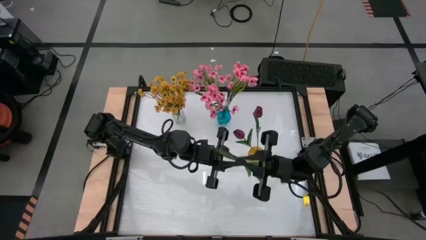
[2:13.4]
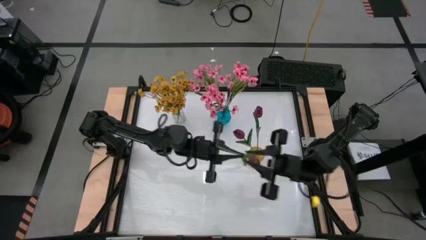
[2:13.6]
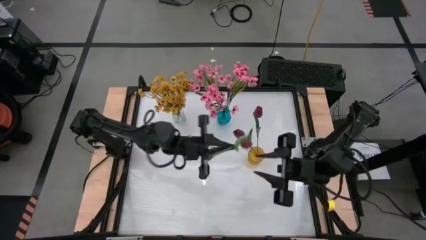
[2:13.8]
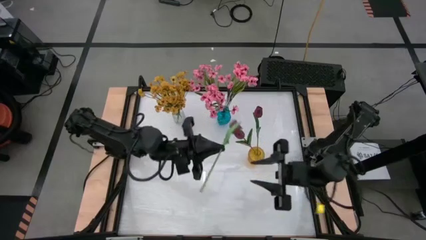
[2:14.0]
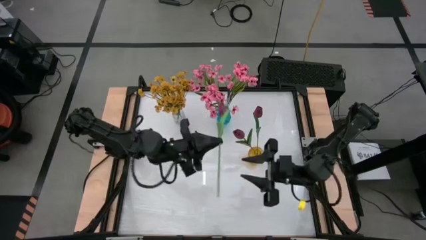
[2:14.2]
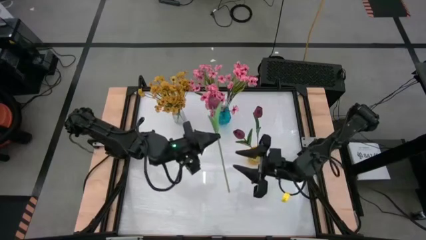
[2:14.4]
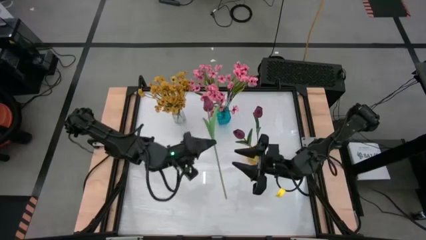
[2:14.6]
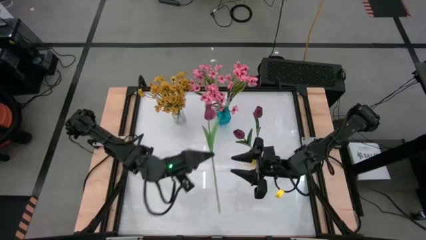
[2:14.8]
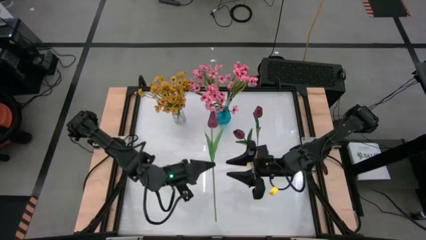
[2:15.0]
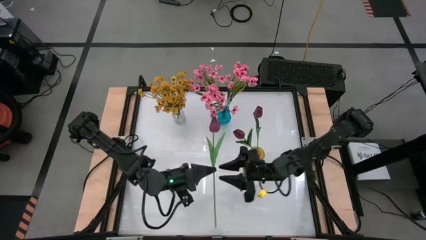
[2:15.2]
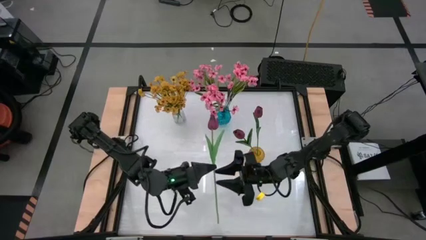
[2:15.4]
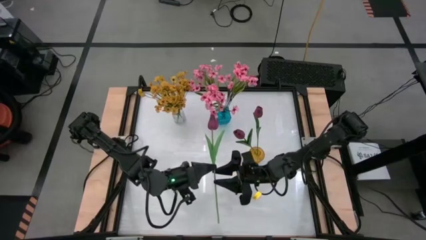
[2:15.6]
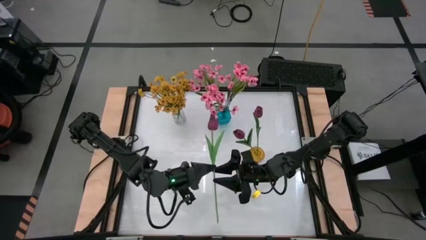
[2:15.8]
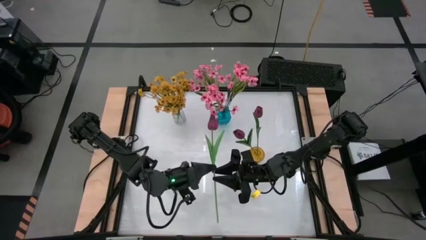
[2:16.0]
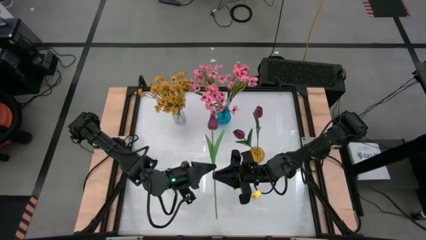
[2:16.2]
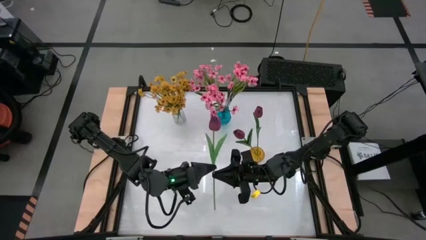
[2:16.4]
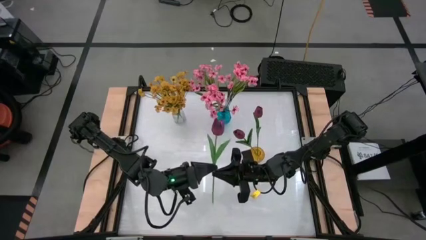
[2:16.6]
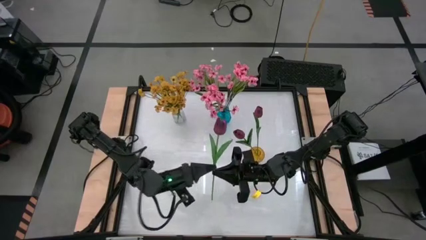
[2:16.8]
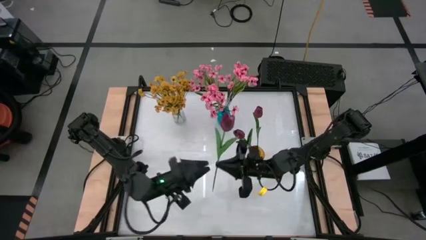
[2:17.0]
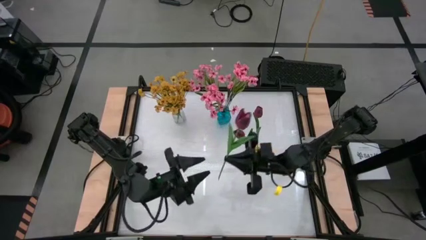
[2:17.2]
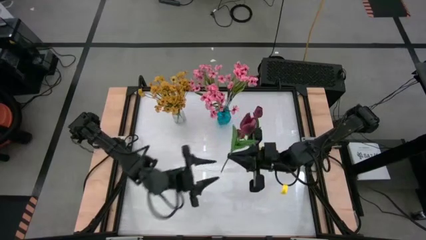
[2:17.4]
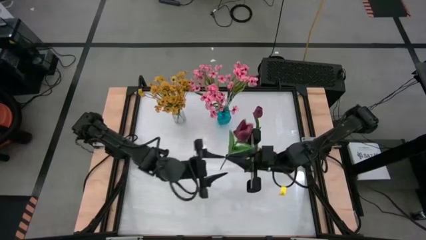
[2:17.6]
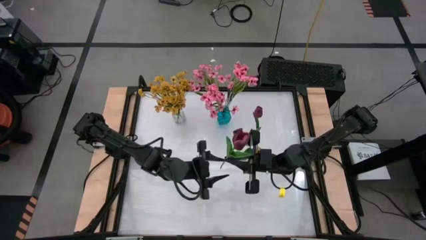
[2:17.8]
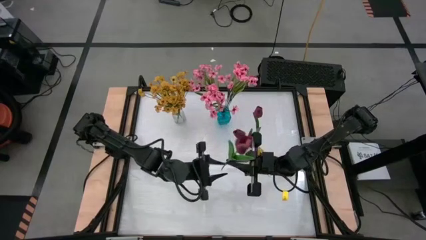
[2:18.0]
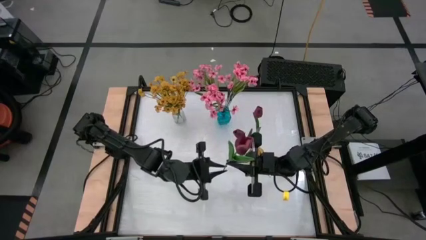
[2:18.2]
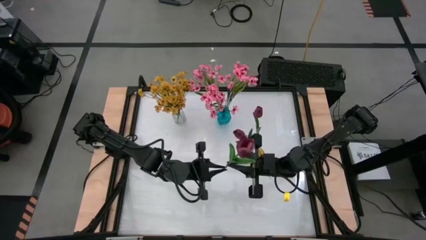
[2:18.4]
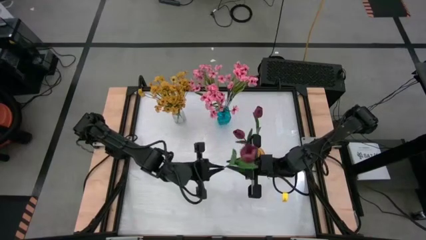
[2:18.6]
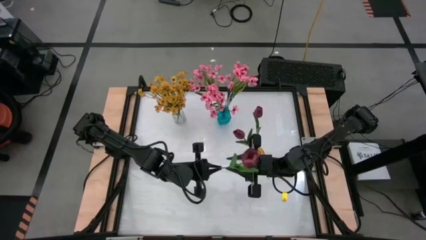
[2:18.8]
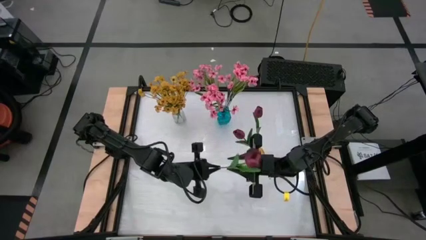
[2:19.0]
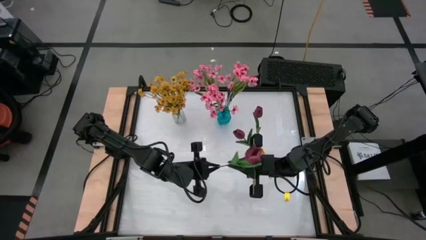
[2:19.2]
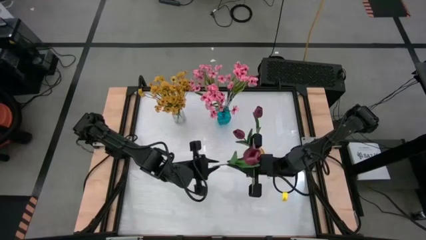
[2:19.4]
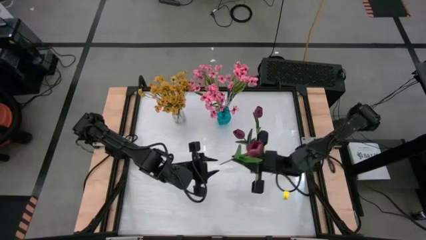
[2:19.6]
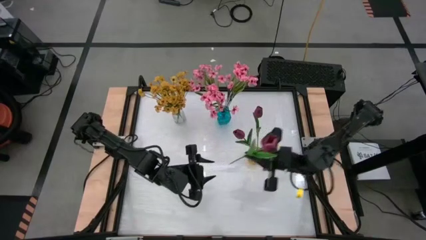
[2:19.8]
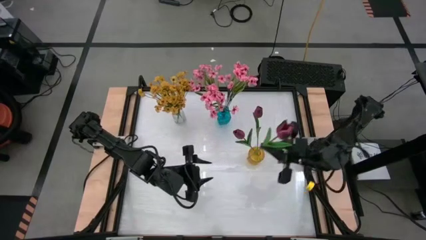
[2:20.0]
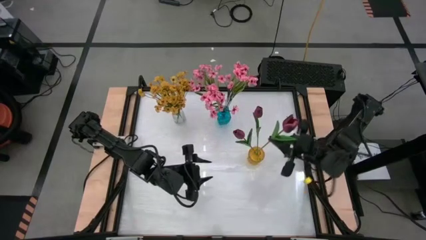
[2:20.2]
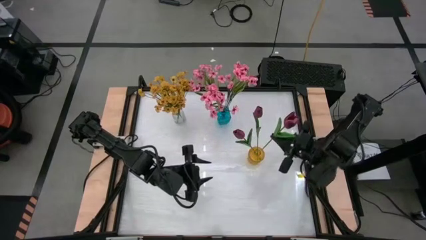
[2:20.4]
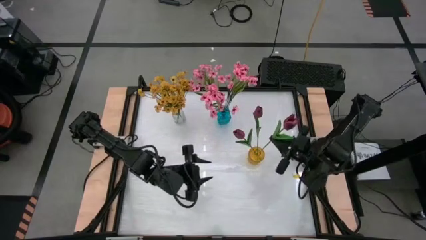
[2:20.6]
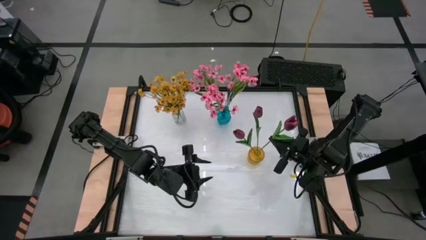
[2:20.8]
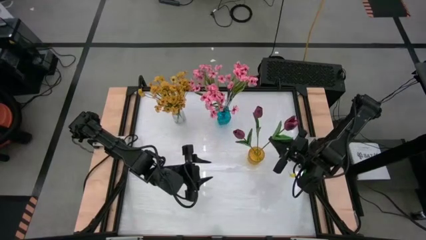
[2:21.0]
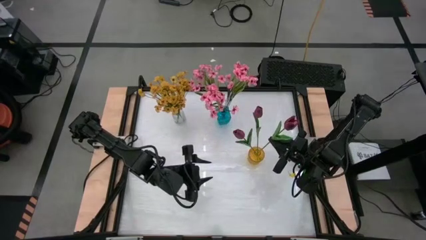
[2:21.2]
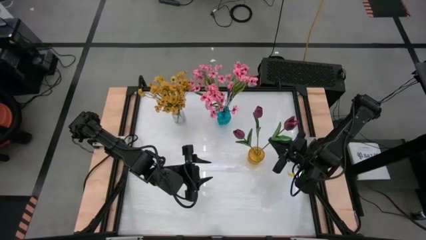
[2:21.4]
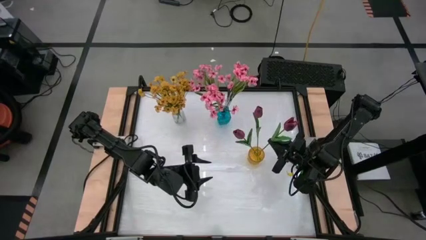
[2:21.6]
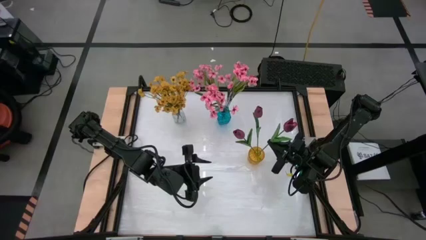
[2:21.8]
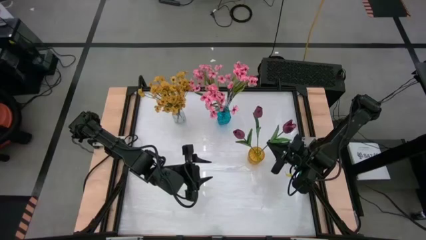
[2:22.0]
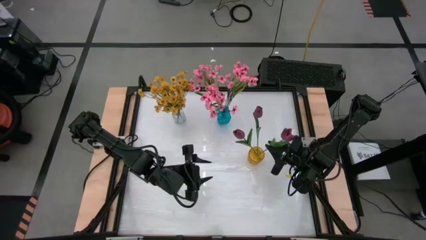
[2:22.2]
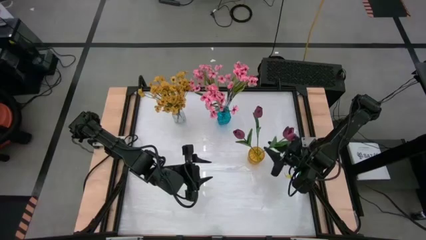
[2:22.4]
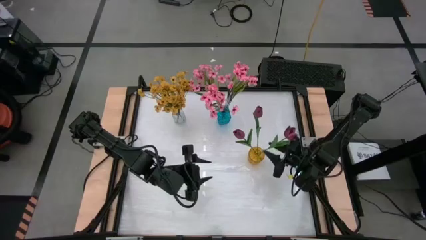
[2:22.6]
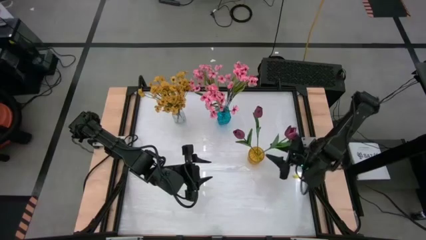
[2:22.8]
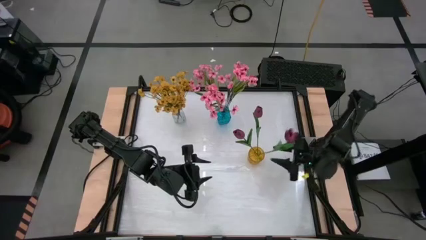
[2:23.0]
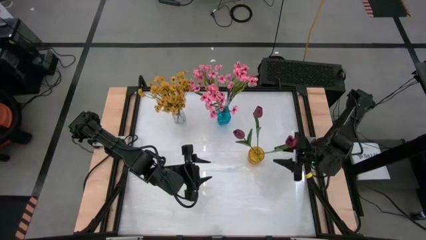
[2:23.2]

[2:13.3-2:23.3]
Task: Sort flowers into vase by color
Put the red flower into the yellow vase

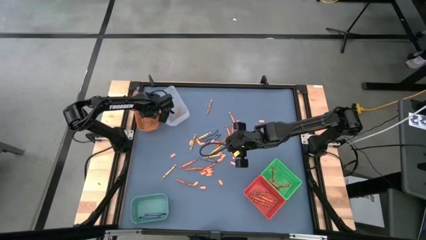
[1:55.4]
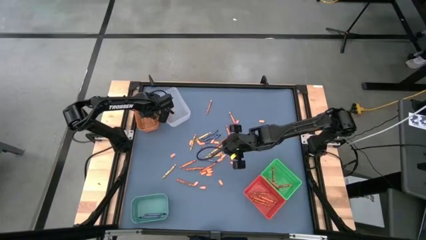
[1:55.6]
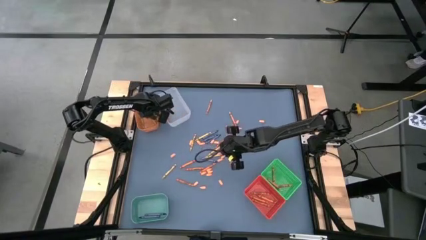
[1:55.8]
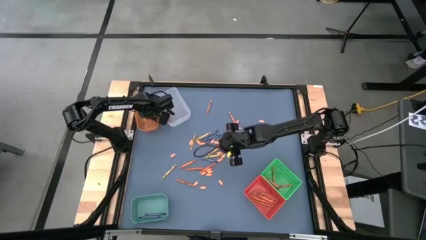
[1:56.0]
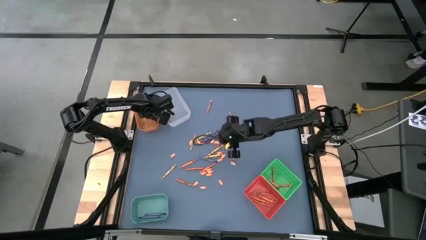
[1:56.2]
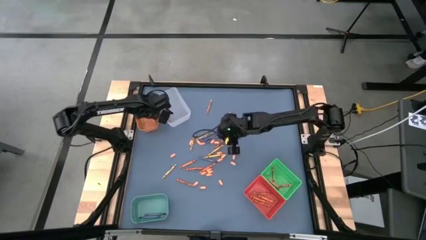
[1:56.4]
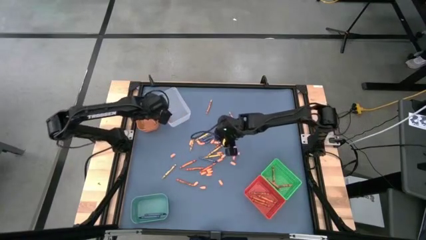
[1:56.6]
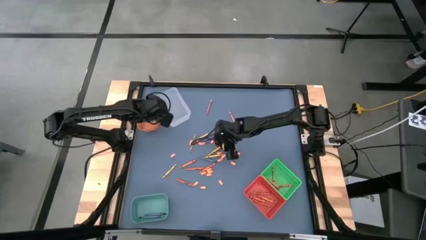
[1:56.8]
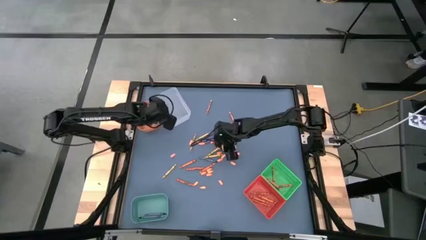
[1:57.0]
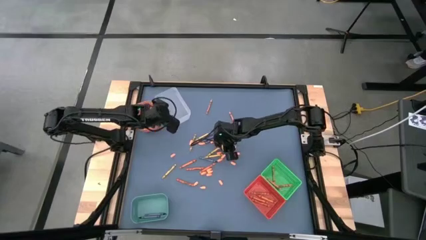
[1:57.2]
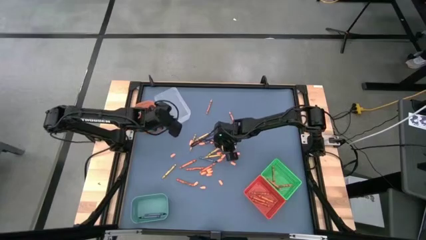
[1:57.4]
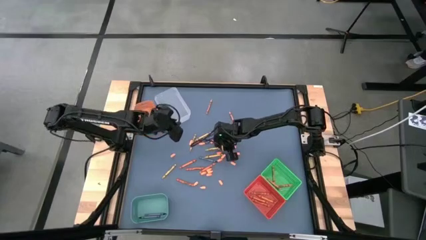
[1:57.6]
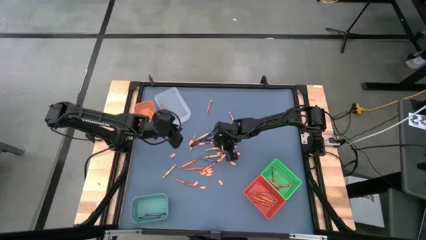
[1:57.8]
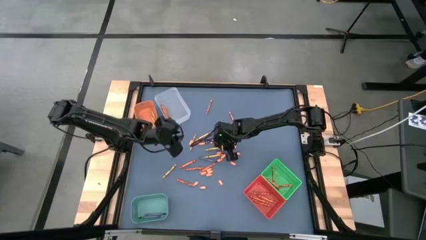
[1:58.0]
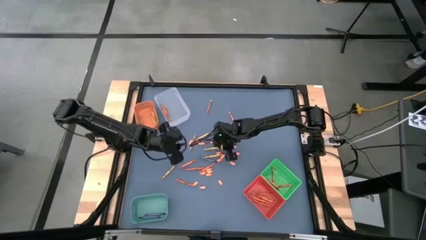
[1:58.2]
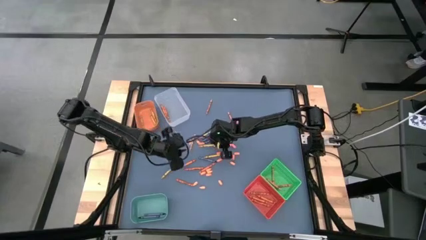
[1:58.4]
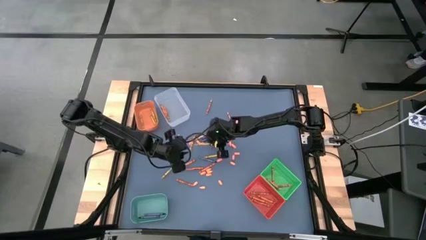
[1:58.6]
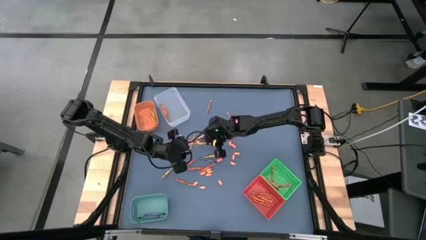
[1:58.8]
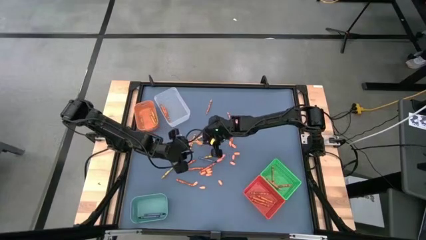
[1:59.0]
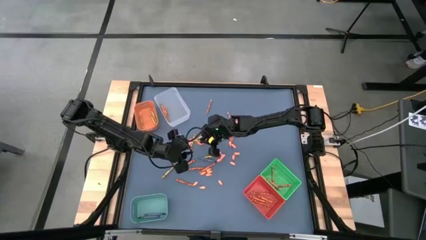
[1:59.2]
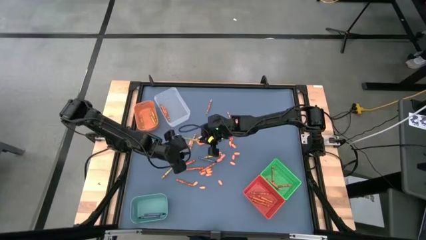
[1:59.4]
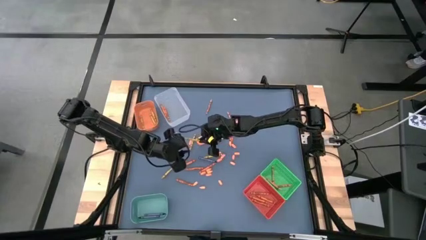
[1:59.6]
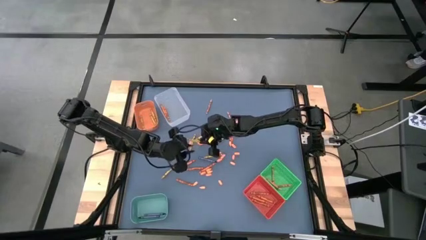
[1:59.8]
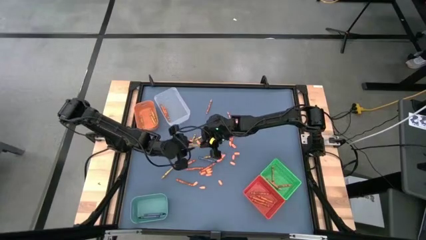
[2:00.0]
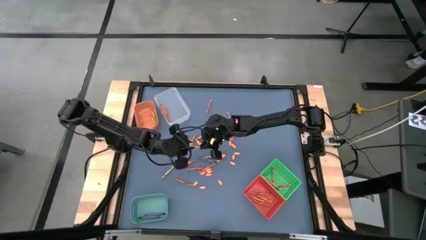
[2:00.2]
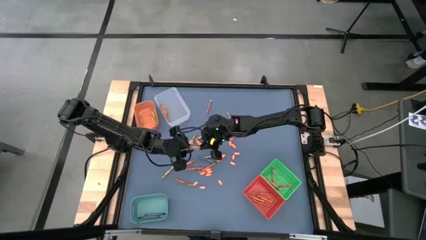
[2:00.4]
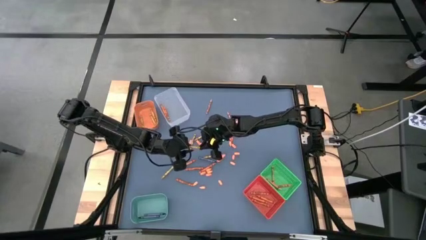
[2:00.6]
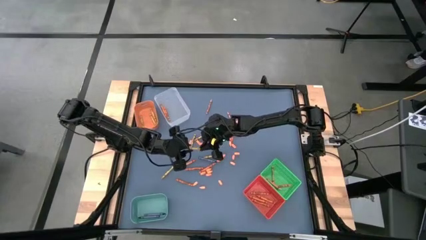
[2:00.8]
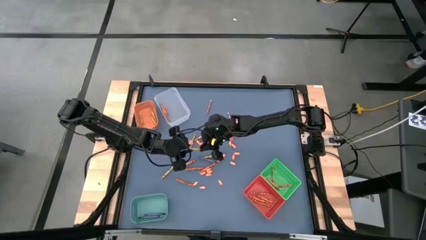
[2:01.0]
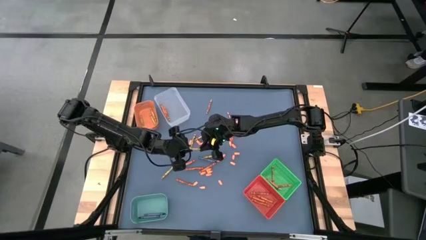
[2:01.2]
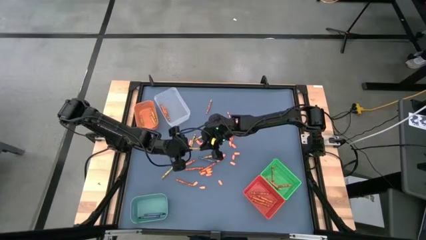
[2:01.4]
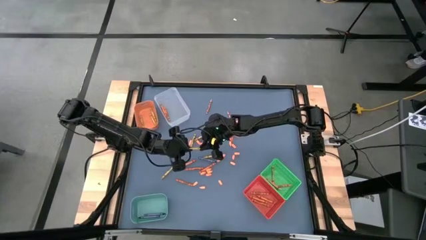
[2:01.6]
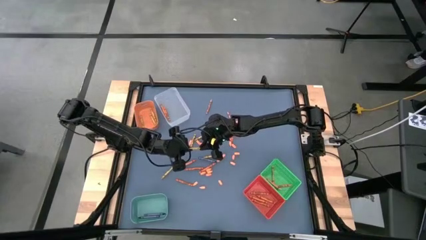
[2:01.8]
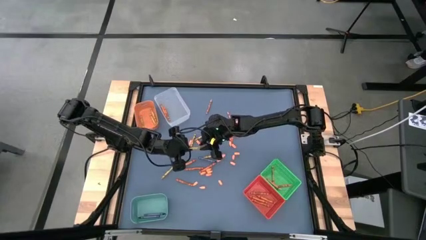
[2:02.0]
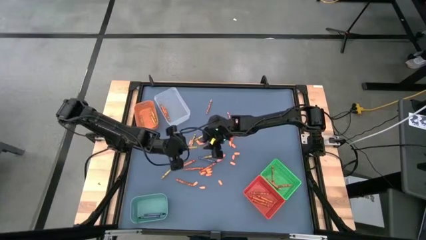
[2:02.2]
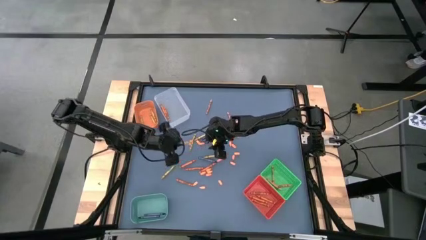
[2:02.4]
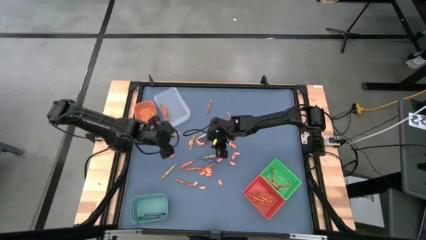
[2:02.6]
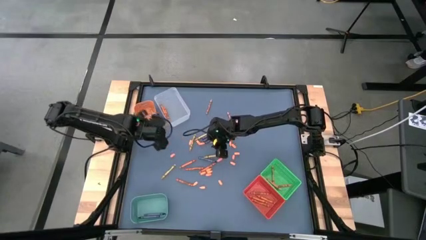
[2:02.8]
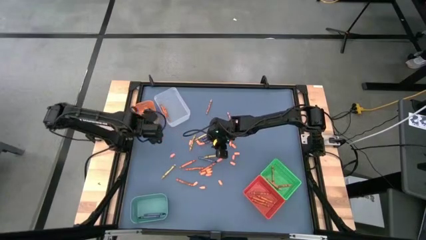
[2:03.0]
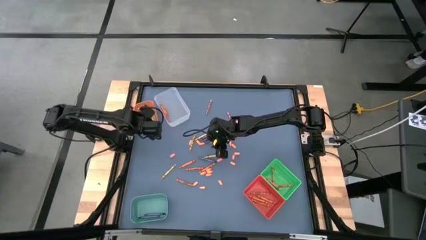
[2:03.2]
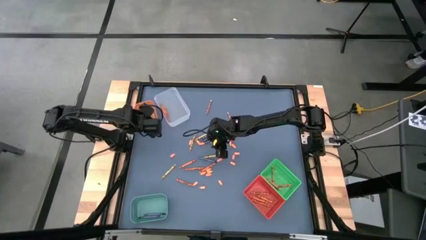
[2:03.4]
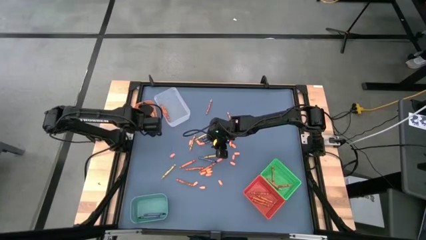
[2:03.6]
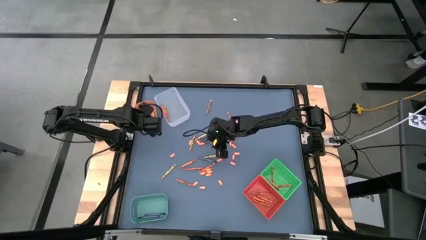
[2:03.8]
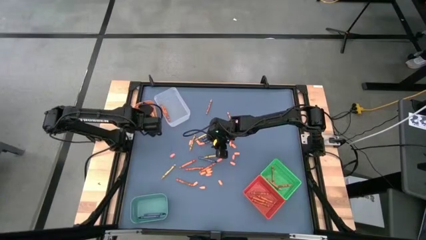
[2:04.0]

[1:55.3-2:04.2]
Task: Sort crayons
Put the yellow crayon into the orange bin
